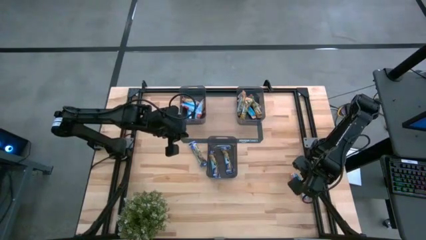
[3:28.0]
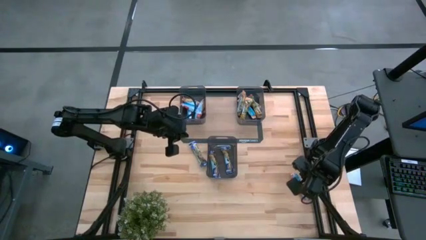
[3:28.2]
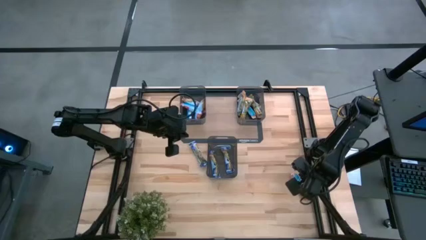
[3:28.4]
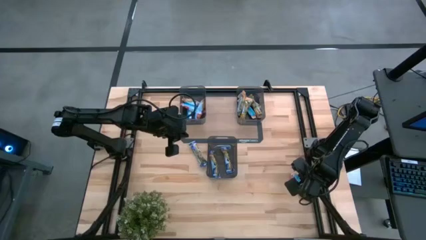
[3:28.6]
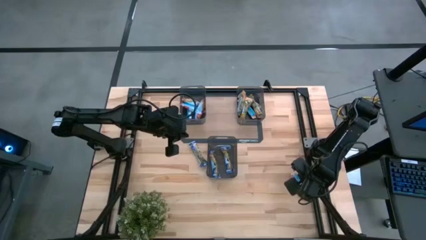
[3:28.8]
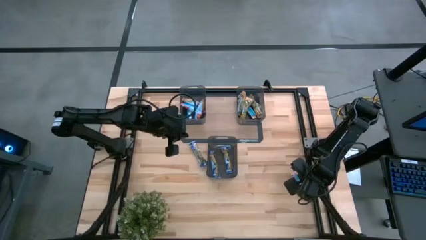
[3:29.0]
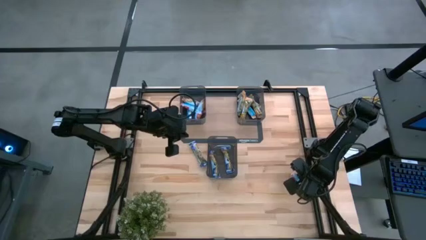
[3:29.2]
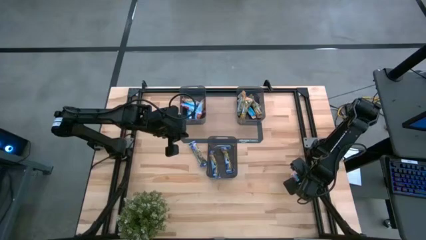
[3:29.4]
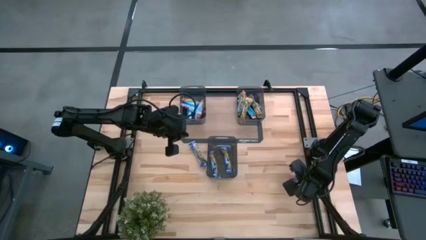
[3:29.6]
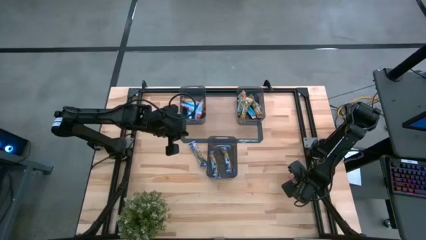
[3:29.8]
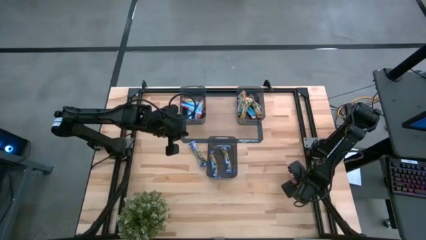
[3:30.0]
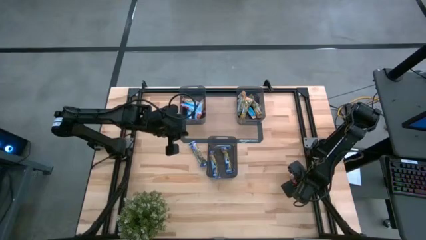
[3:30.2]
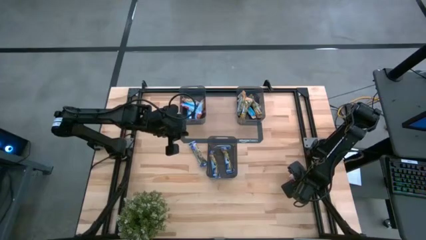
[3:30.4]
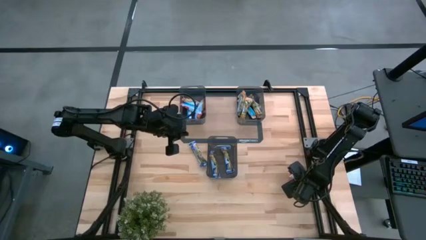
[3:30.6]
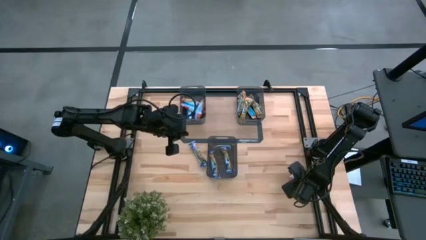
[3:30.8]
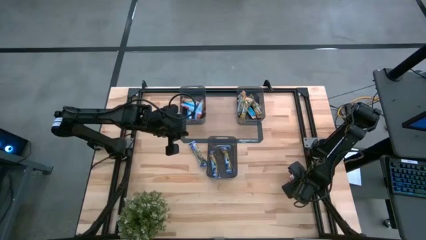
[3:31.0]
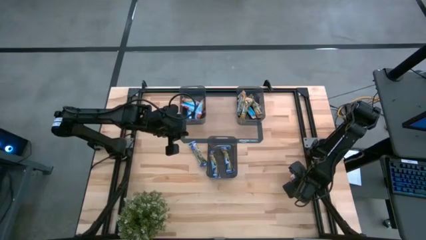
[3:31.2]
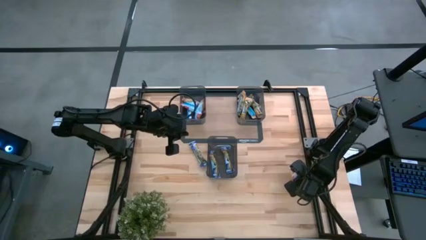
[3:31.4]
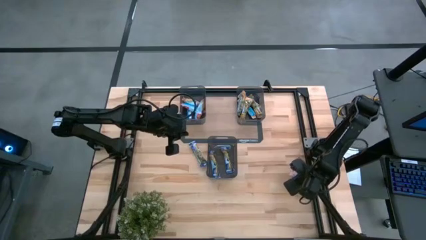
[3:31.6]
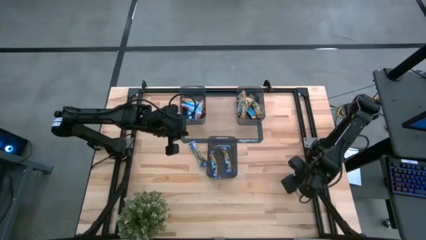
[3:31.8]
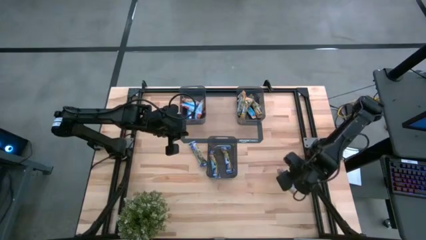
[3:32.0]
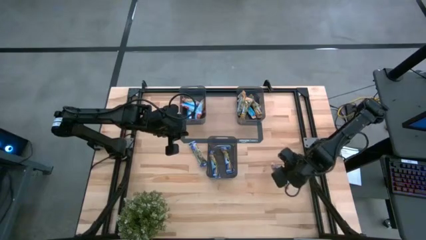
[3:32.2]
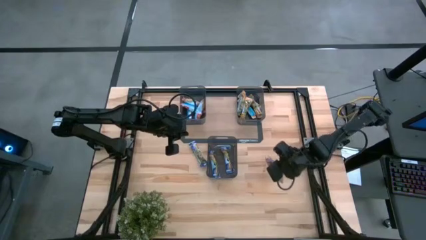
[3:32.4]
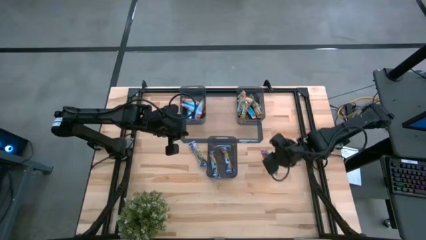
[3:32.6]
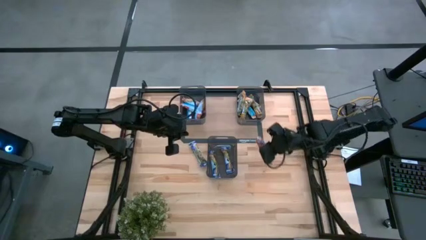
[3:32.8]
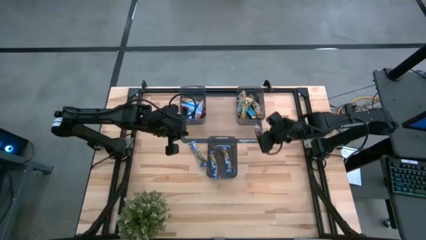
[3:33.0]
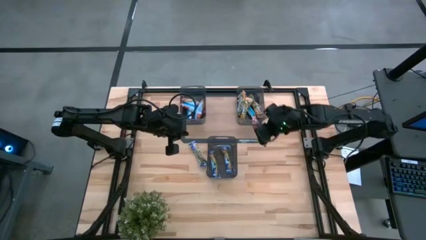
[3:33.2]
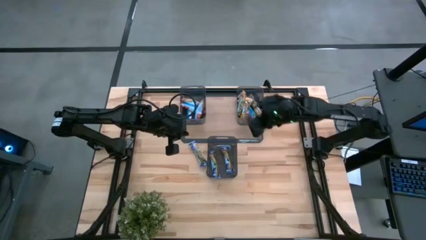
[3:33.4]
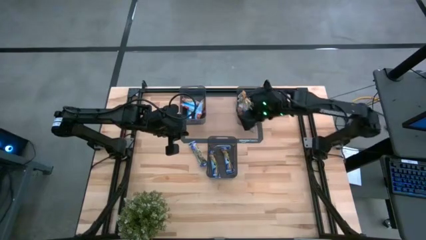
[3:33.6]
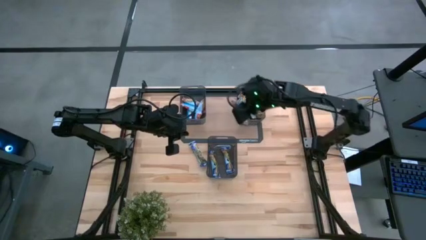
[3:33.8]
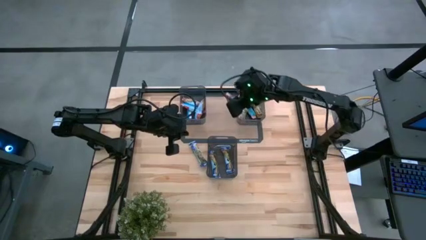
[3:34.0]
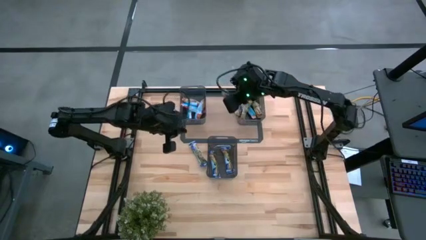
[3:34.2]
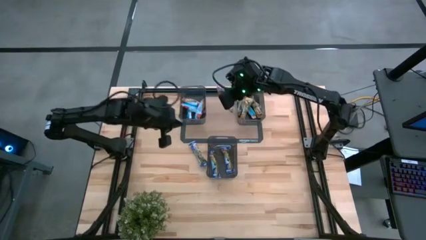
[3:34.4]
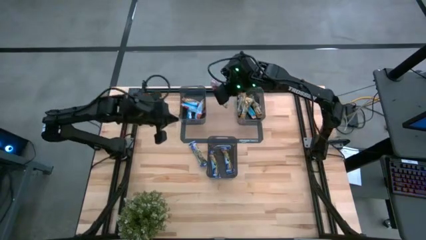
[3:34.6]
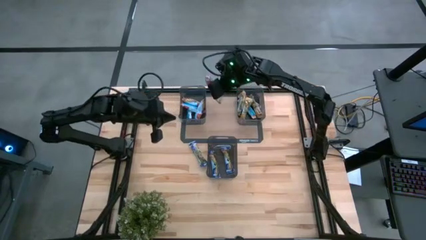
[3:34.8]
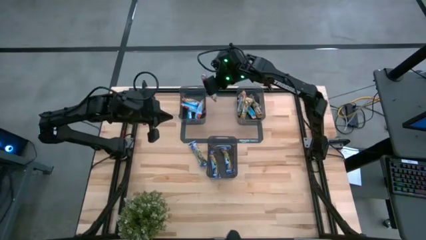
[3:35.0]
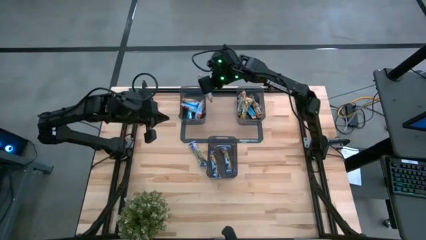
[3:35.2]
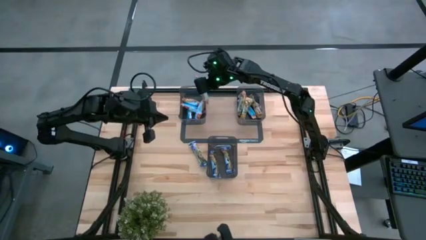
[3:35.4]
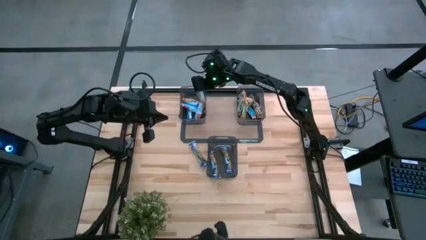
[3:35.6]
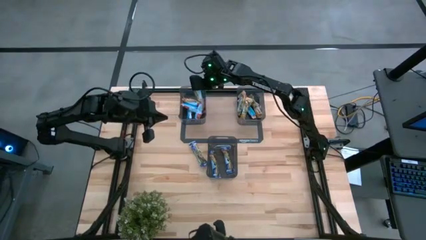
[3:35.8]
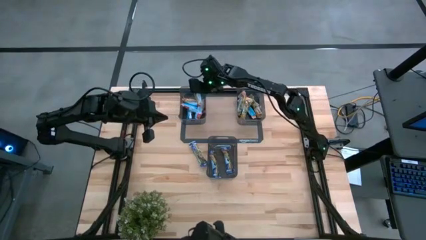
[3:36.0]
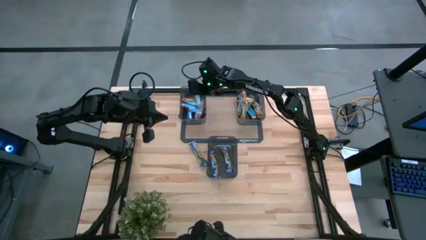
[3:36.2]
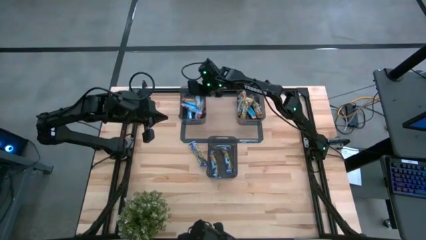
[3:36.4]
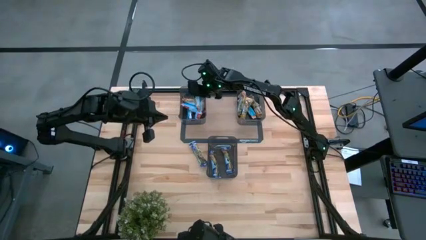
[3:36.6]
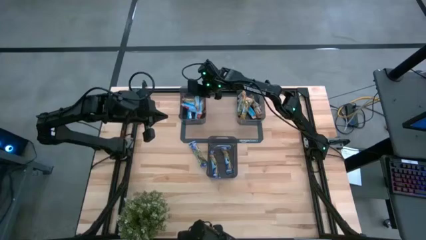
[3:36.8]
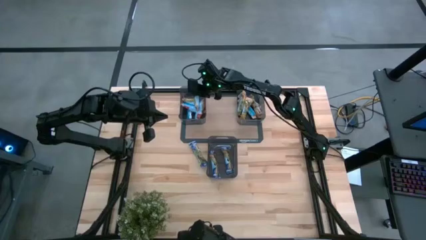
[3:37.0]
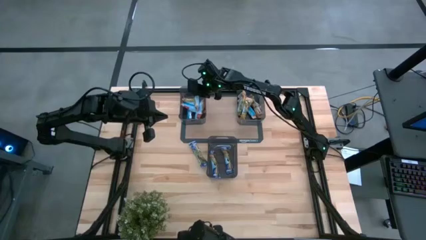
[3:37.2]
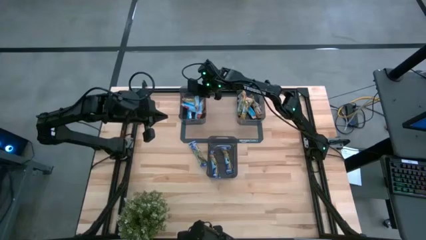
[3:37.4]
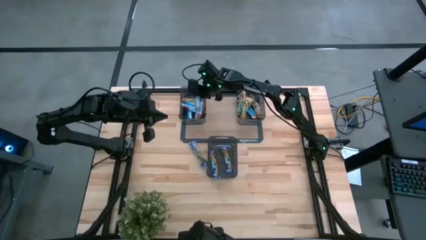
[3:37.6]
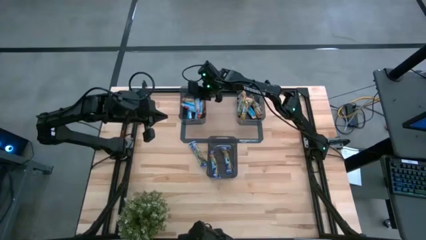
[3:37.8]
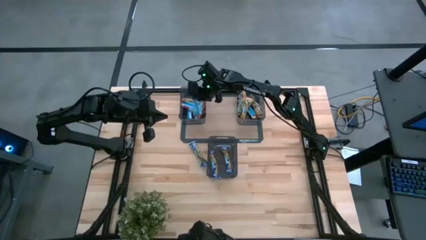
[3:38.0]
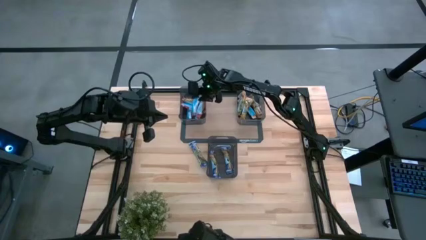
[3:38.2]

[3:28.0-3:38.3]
Task: Pick and place Granola Bars by type
Put the red granola bar into the left black bin

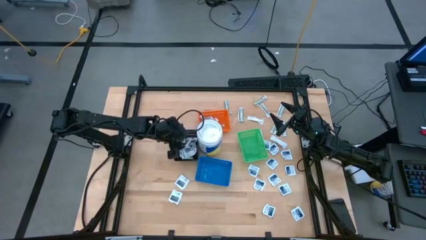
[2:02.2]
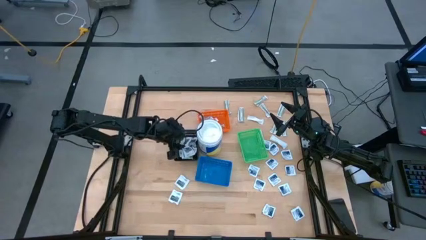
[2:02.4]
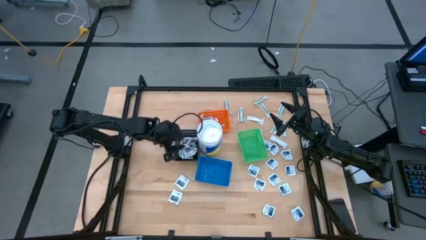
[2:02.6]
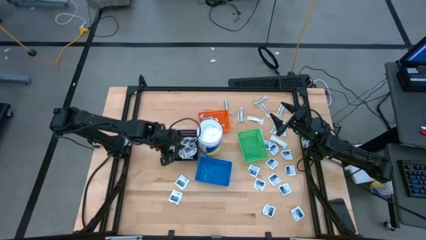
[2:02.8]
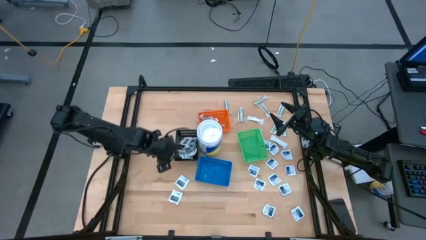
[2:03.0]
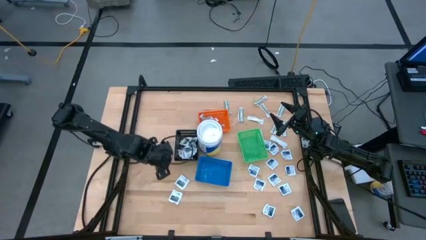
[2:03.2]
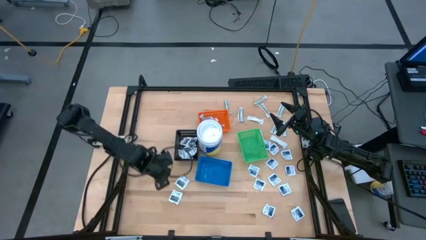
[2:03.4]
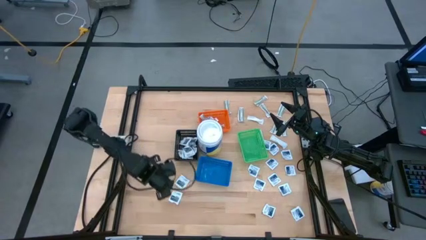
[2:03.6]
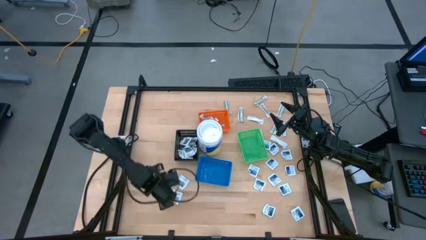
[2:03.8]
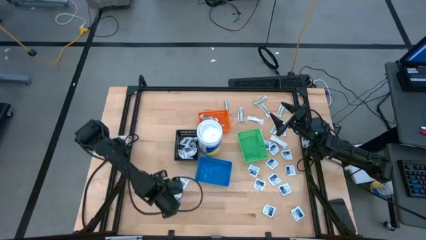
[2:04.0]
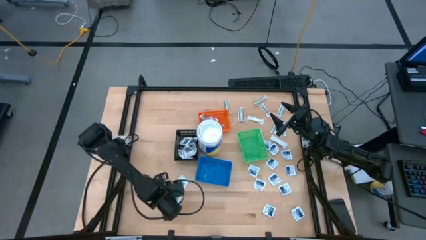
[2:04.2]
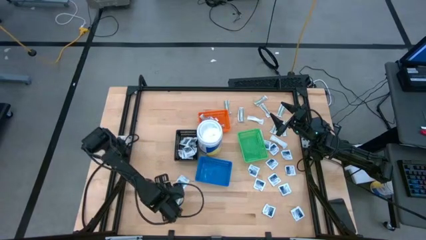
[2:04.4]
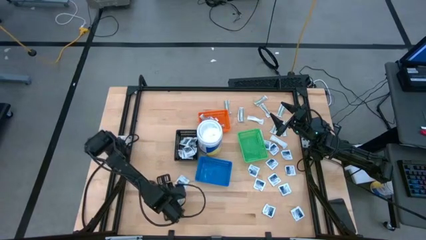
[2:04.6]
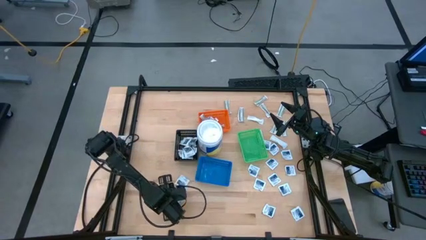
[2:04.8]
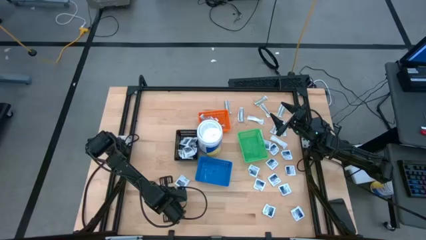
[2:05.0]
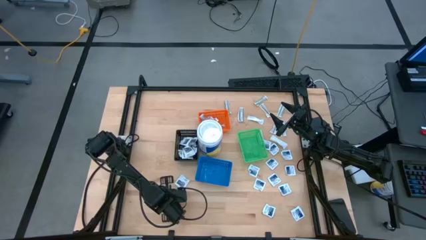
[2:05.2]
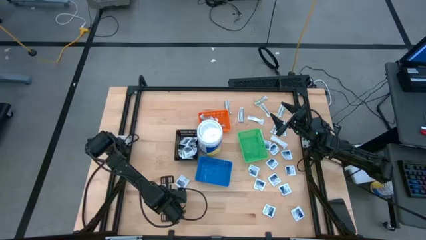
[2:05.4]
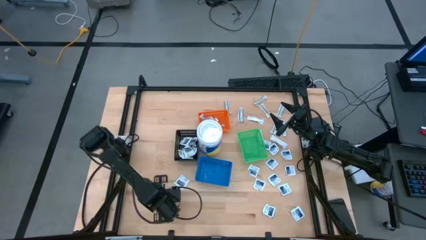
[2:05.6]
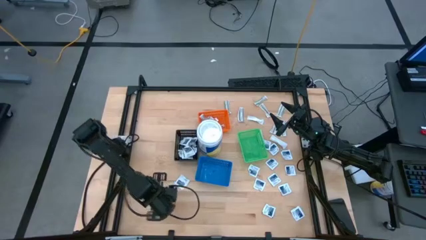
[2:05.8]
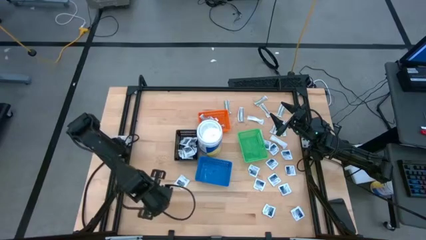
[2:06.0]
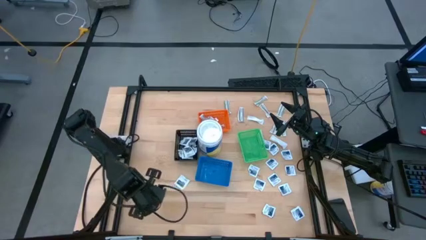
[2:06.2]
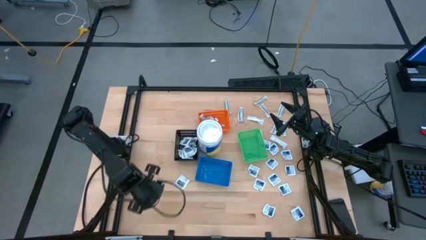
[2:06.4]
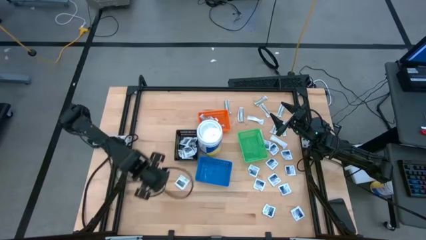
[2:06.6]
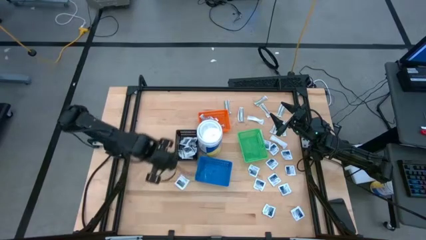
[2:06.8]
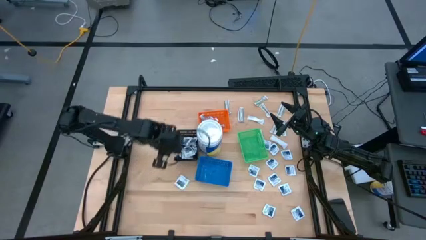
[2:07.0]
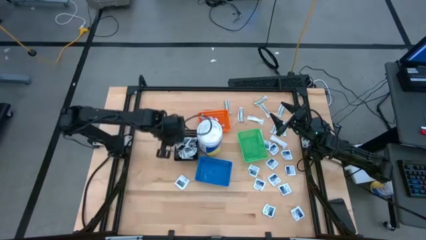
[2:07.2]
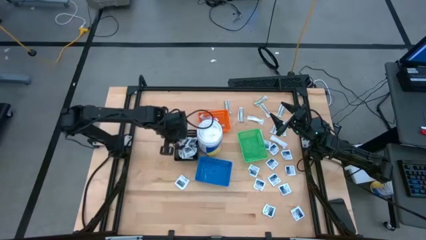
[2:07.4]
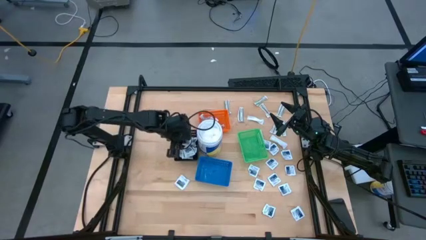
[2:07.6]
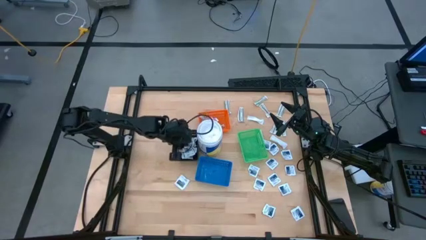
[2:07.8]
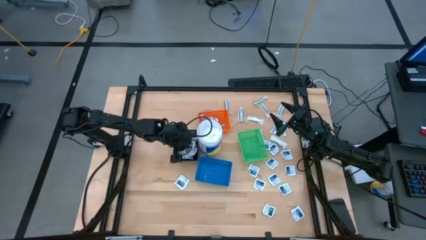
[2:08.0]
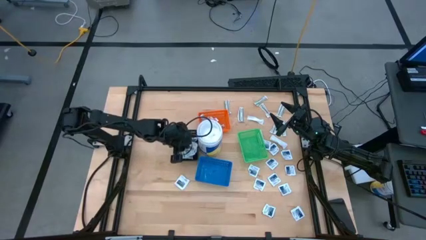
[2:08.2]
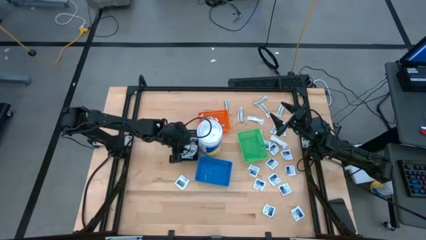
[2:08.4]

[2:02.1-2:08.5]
Task: Pick & Place First Aid Supplies
Put the gray towelette pack into the black bin
